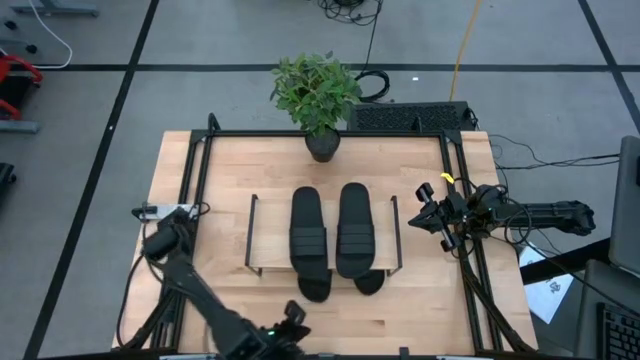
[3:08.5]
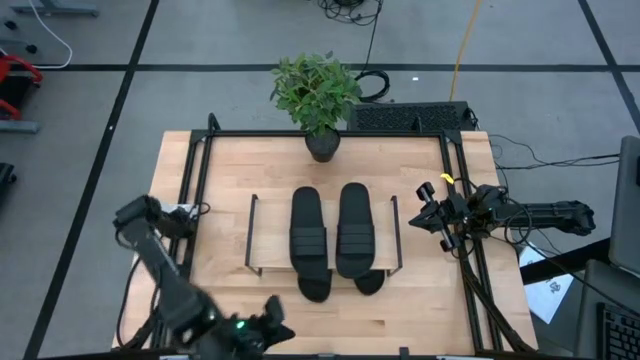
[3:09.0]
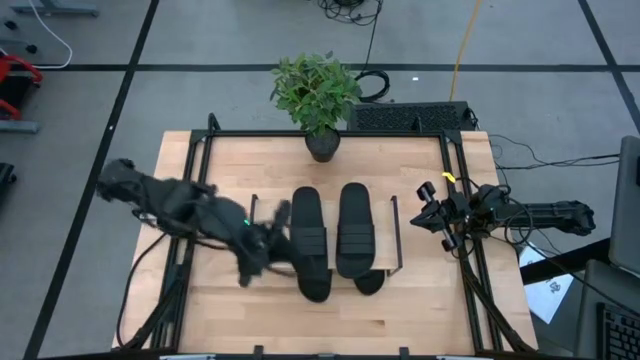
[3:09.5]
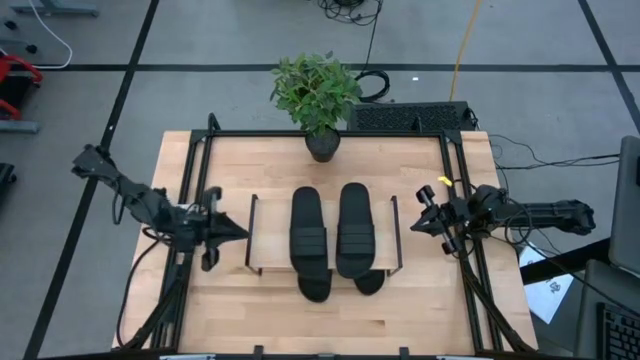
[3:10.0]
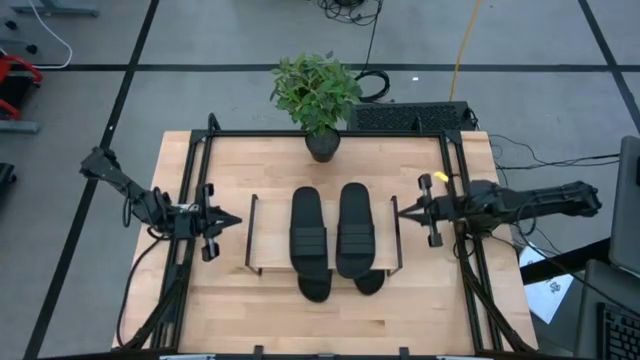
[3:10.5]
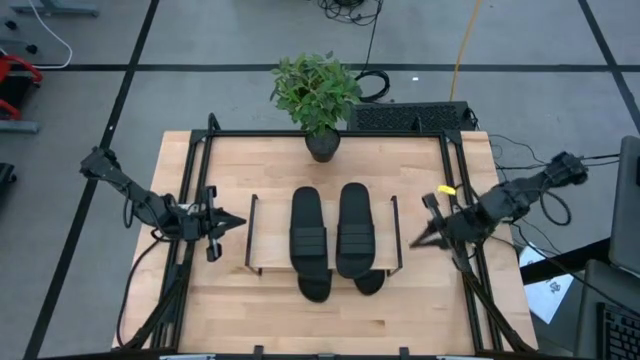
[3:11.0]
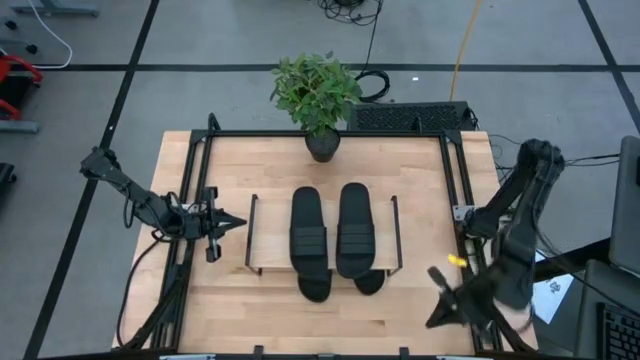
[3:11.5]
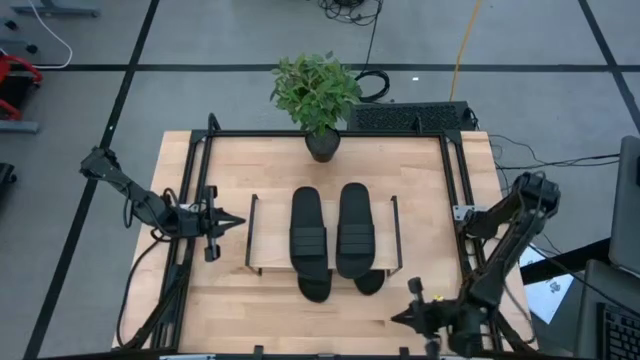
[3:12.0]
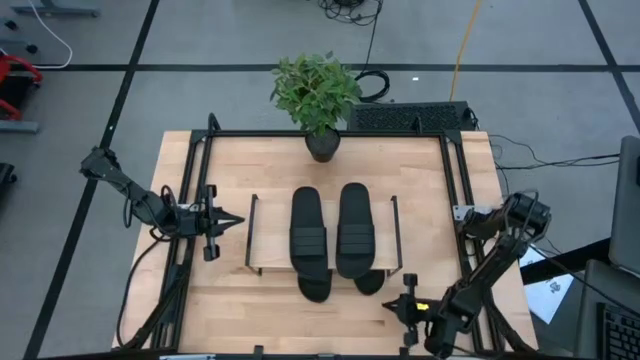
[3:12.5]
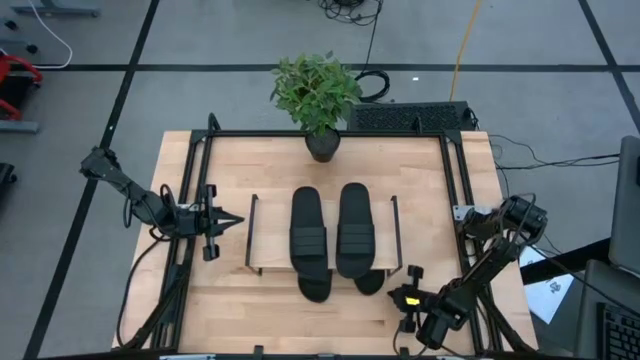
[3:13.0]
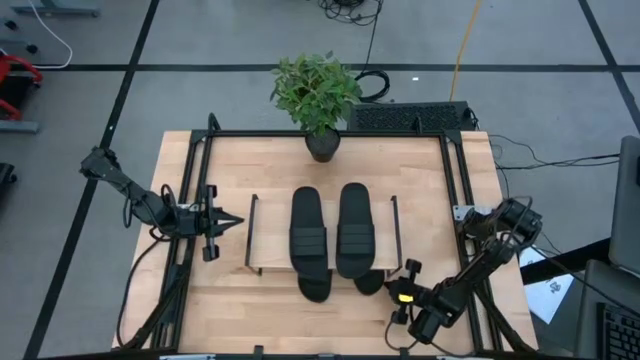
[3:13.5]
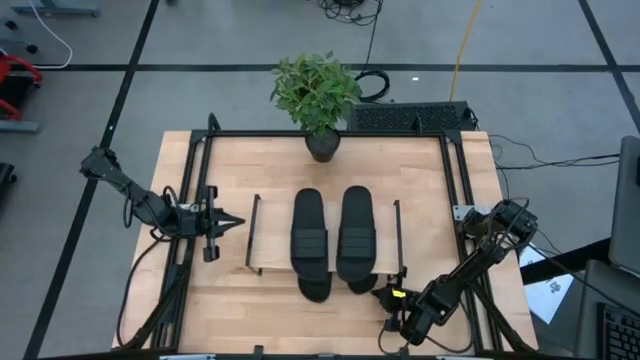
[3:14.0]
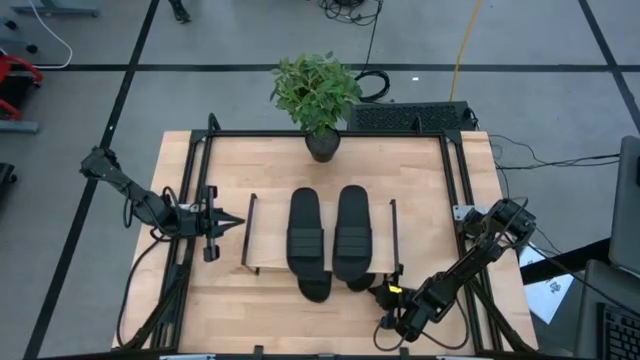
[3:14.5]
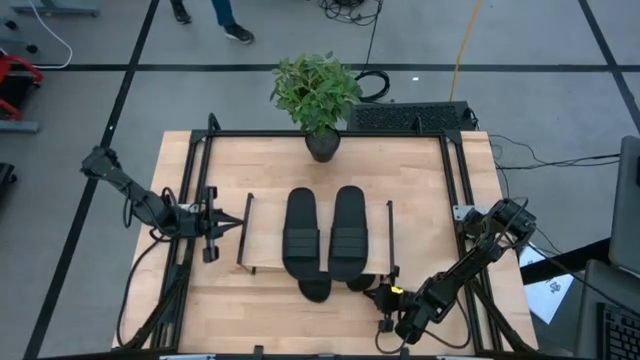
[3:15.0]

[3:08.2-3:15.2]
Task: Pick and place slides into the shelf
Adjust the black slipper under the shelf

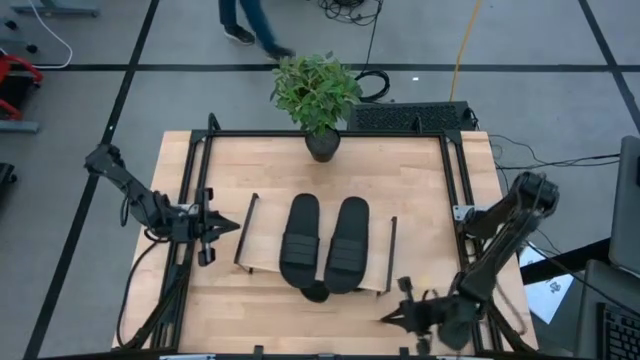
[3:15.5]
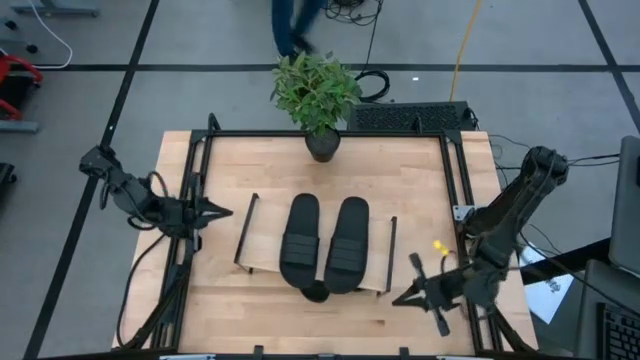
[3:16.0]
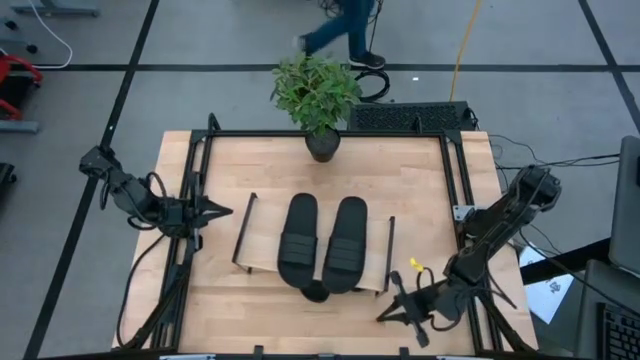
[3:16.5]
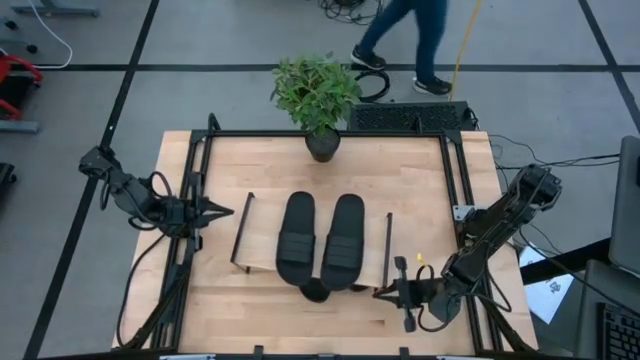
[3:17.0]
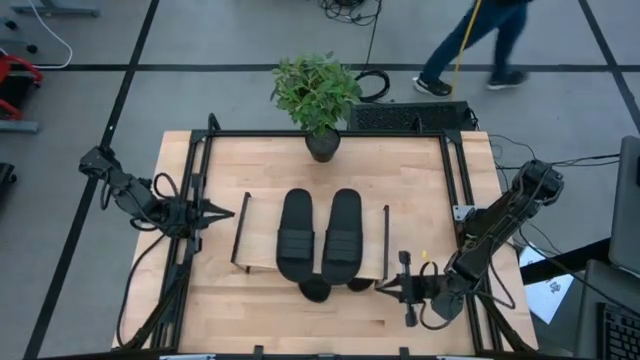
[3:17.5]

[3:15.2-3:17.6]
Adjust the shelf

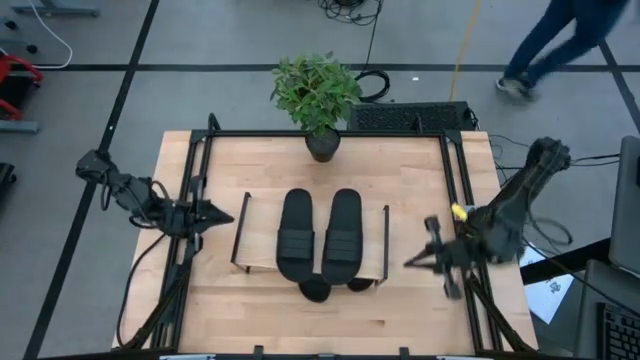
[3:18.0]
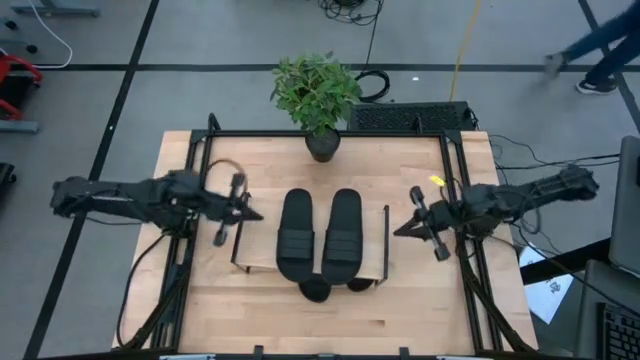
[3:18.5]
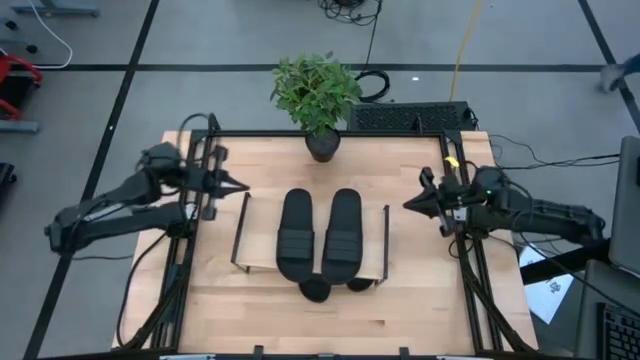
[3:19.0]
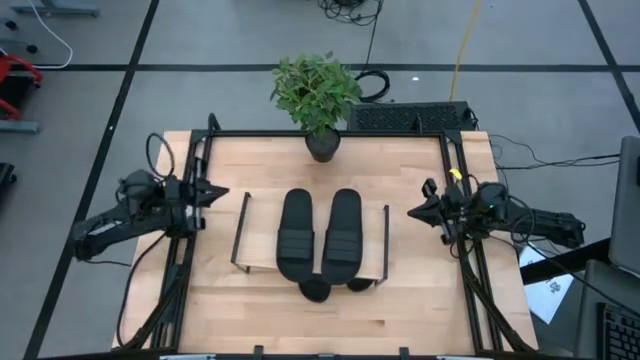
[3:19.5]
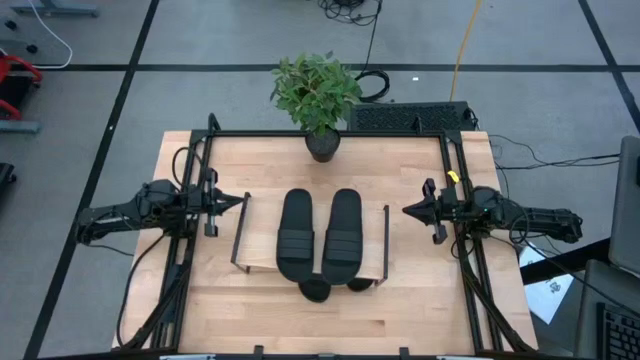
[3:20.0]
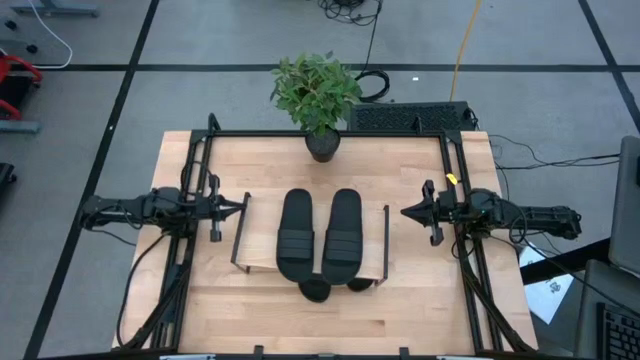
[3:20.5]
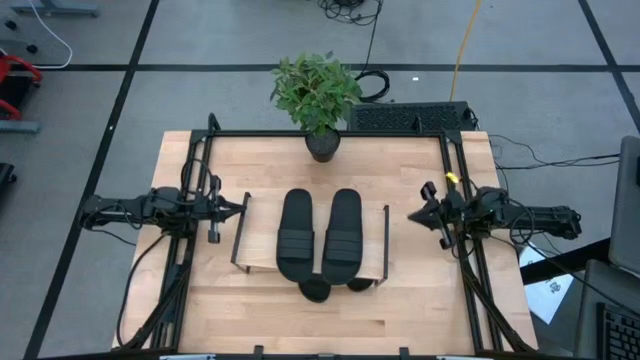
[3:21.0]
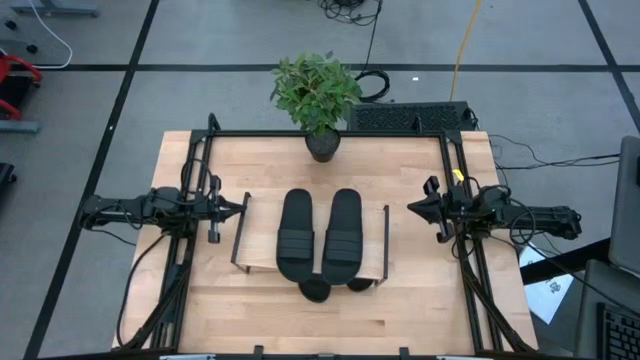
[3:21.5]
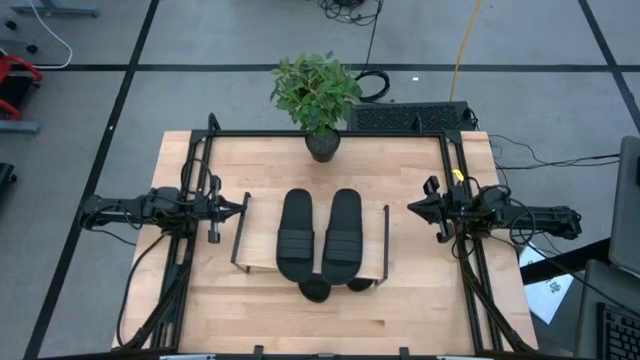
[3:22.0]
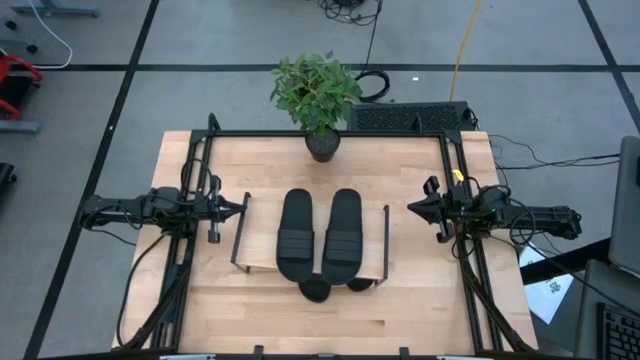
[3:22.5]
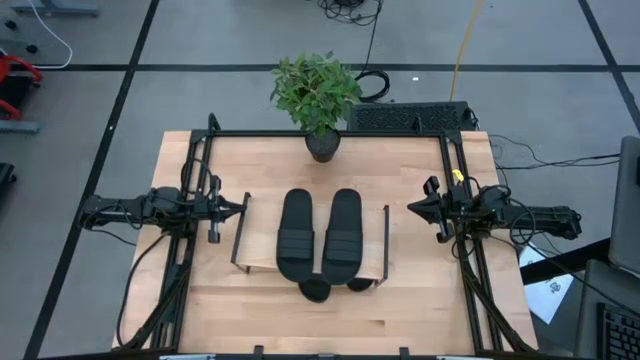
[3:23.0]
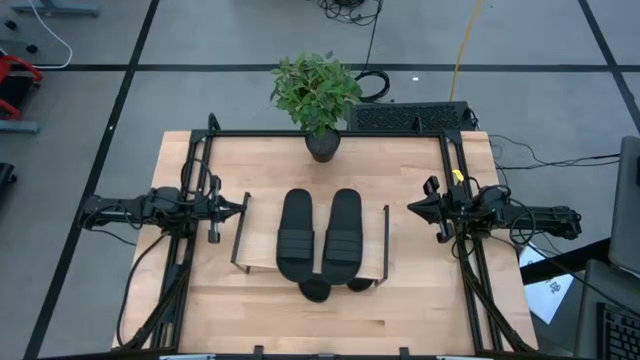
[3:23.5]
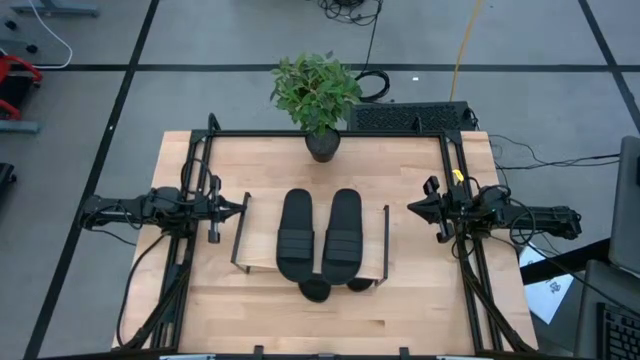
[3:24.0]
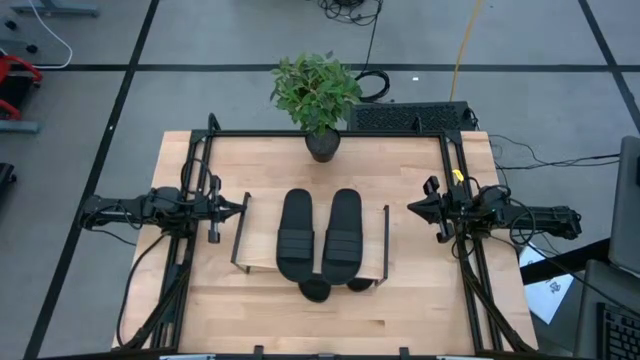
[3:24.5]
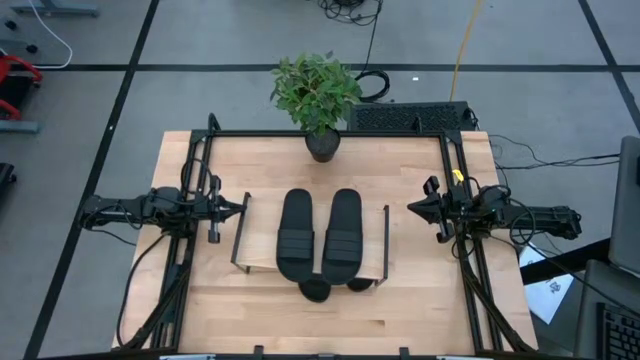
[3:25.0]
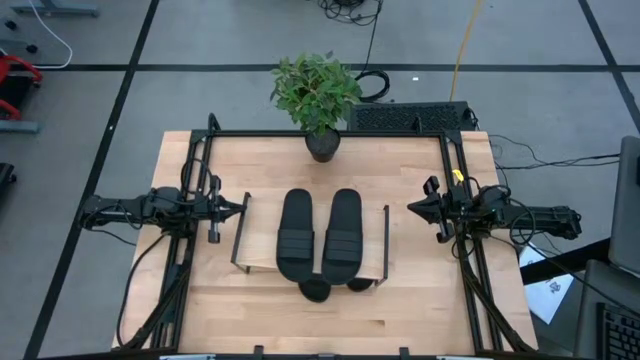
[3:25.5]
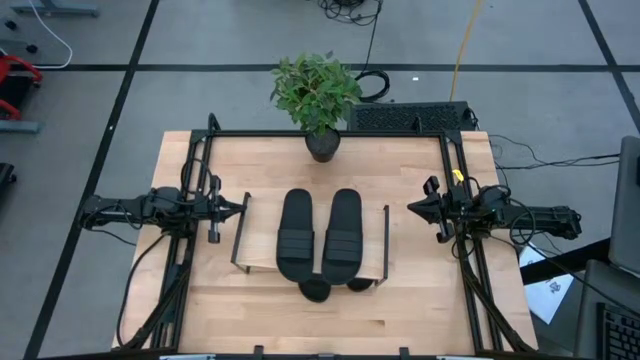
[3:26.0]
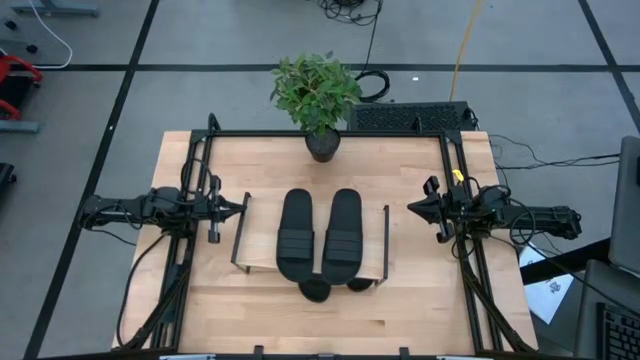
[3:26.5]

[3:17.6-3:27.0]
Return to Home Position

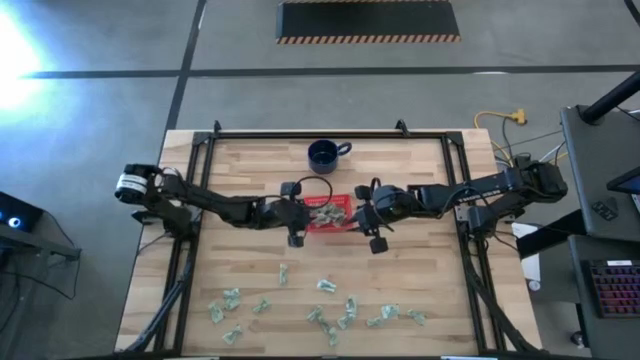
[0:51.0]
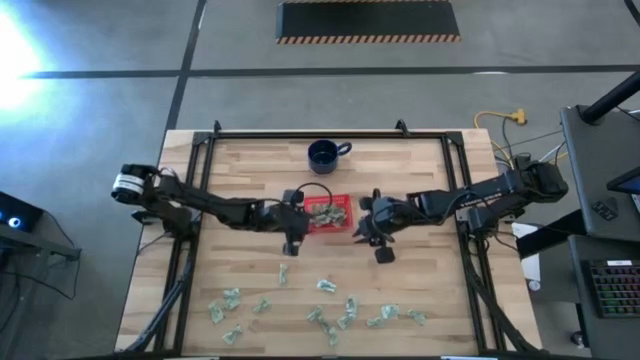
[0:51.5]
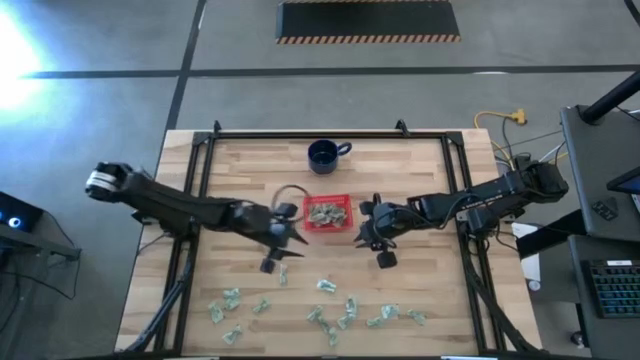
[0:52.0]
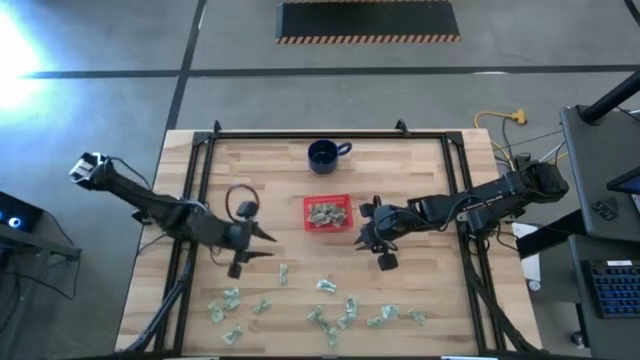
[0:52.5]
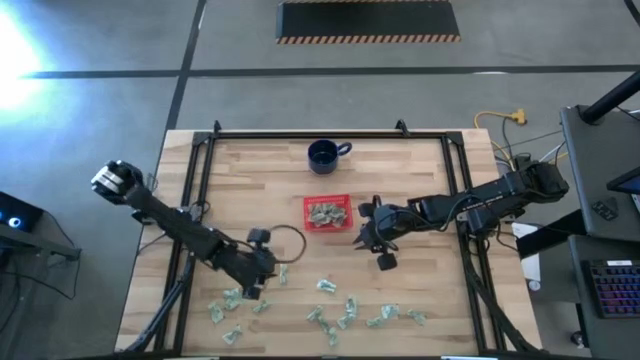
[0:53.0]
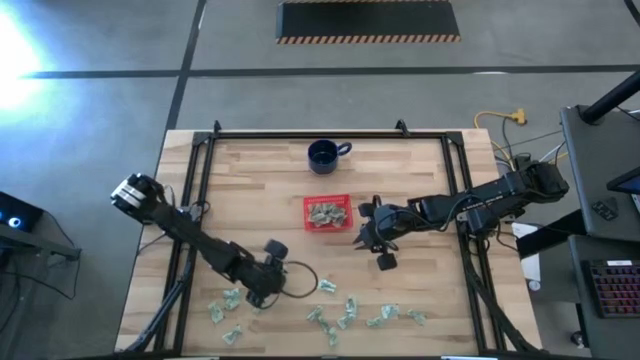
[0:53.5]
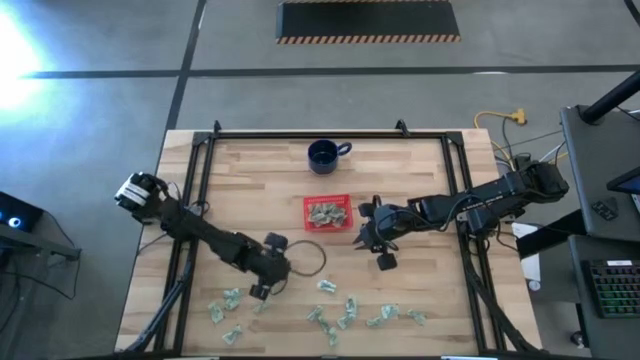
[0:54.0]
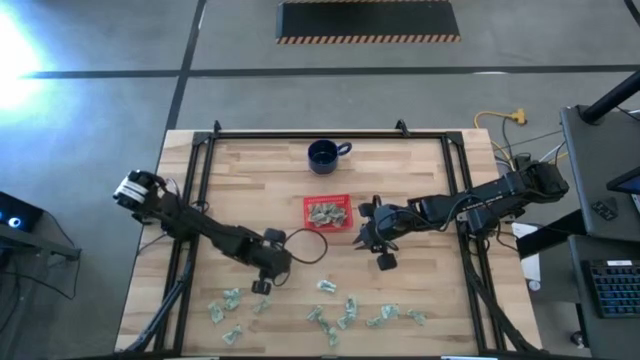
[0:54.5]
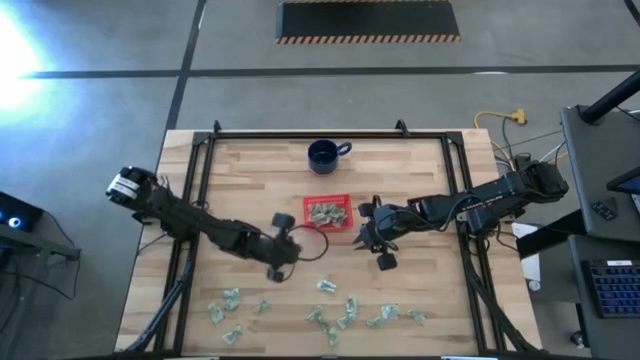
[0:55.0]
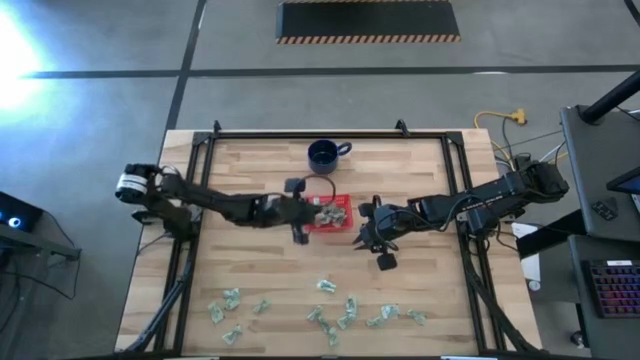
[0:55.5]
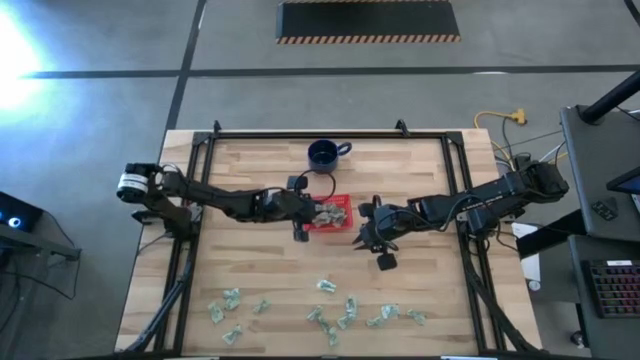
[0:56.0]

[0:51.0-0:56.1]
Task: Pick and place items into bin
Put the stevia packet into the red bin
